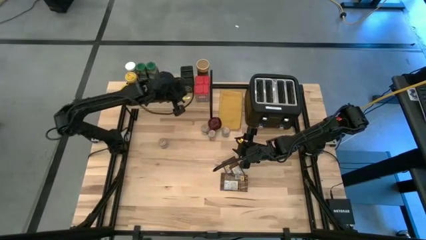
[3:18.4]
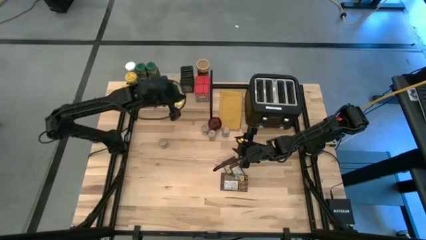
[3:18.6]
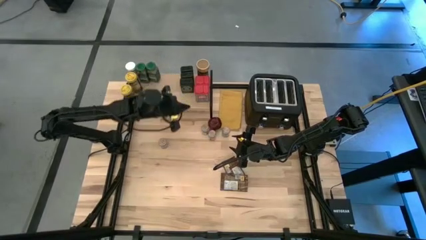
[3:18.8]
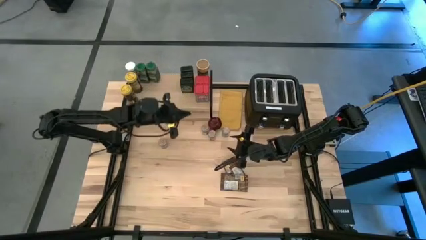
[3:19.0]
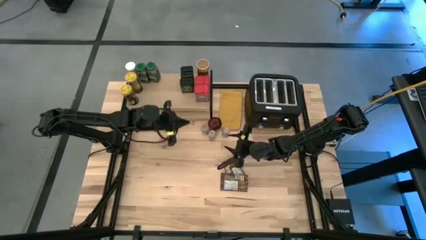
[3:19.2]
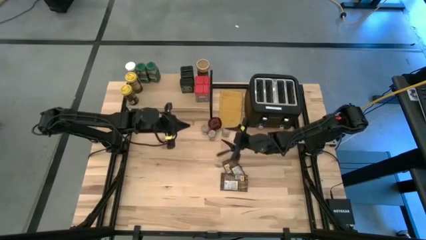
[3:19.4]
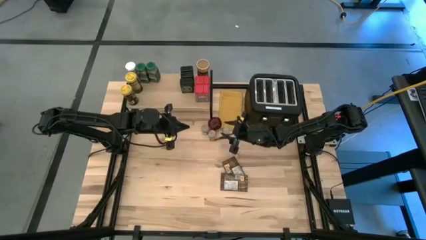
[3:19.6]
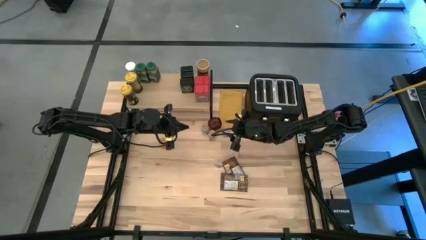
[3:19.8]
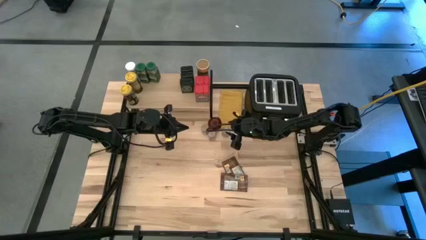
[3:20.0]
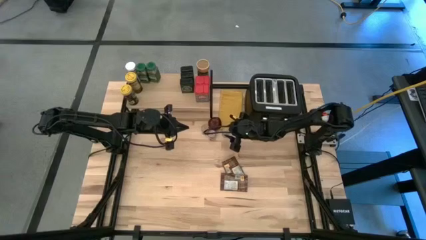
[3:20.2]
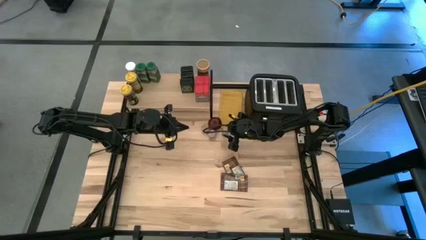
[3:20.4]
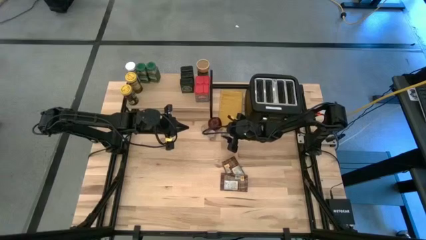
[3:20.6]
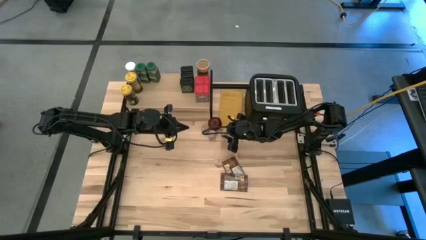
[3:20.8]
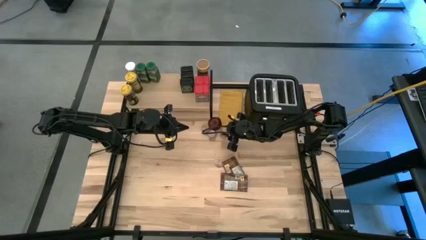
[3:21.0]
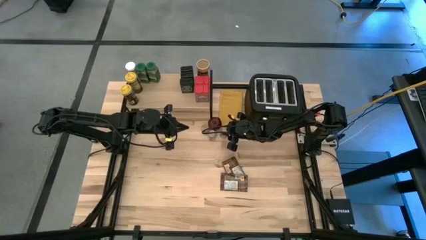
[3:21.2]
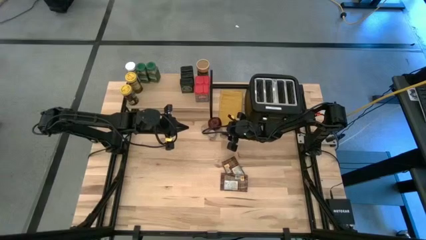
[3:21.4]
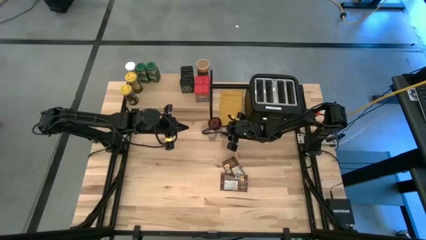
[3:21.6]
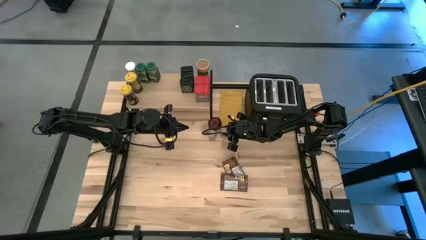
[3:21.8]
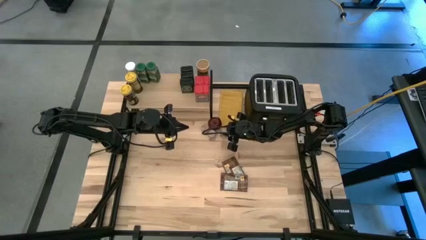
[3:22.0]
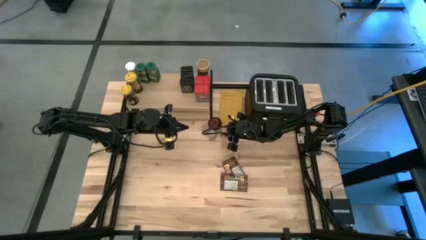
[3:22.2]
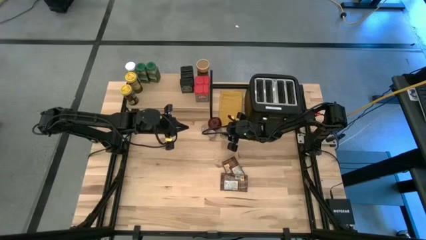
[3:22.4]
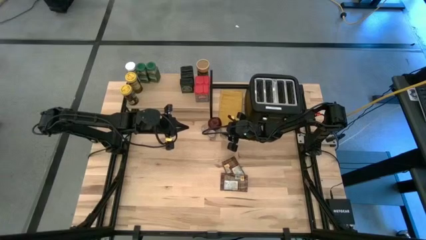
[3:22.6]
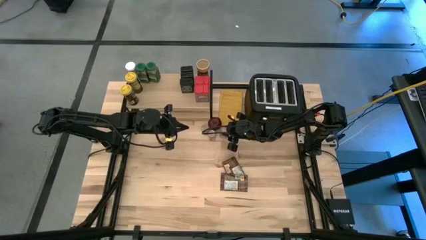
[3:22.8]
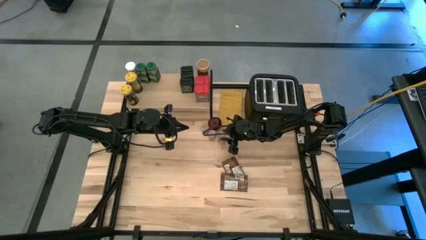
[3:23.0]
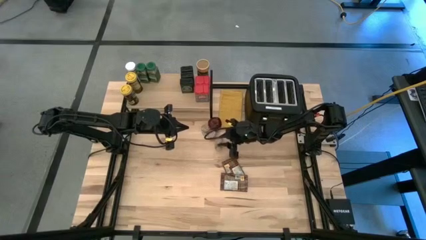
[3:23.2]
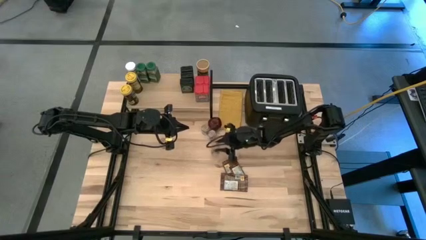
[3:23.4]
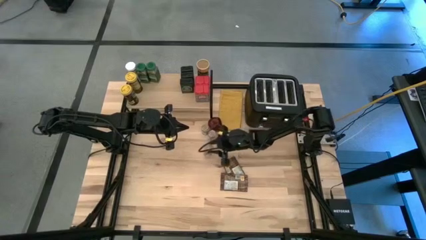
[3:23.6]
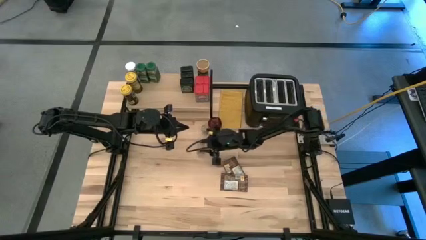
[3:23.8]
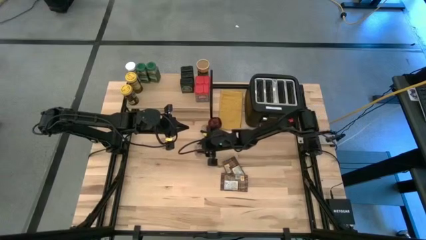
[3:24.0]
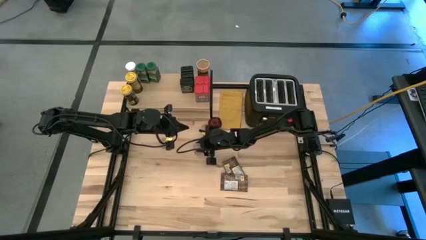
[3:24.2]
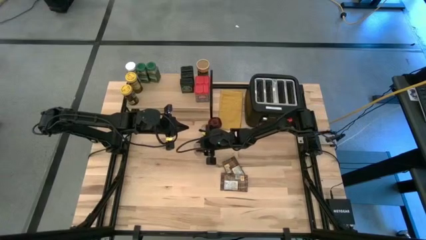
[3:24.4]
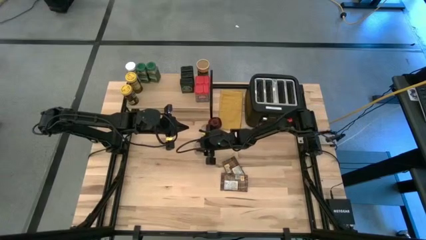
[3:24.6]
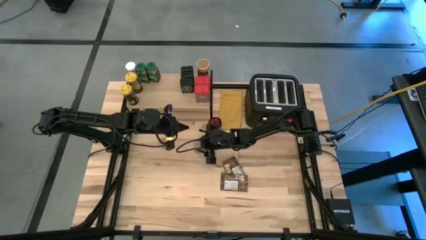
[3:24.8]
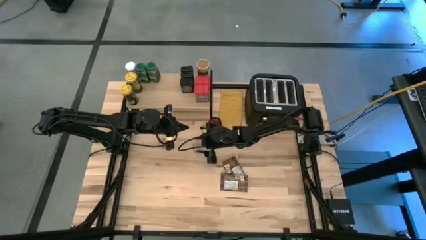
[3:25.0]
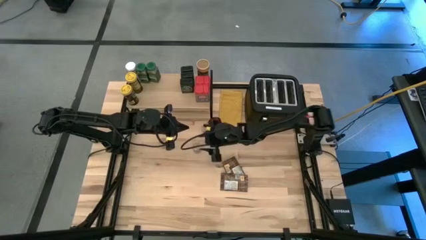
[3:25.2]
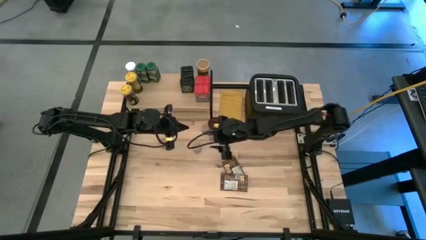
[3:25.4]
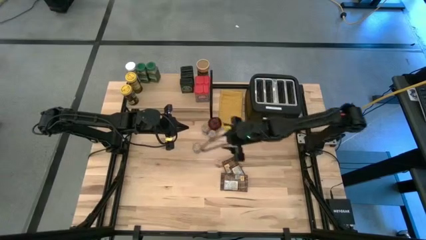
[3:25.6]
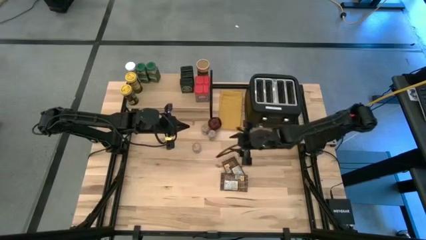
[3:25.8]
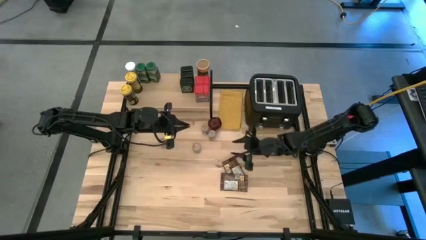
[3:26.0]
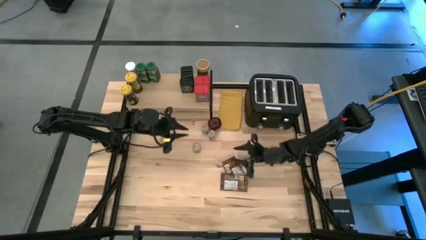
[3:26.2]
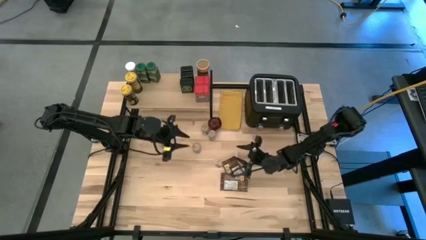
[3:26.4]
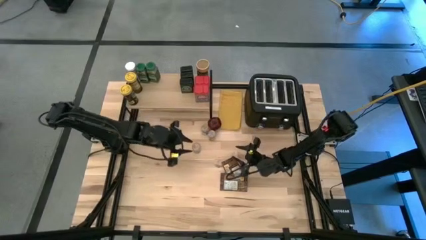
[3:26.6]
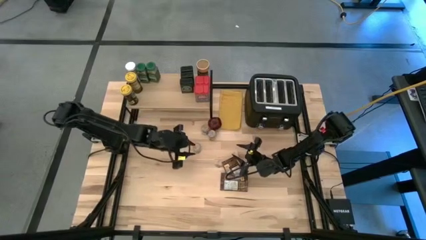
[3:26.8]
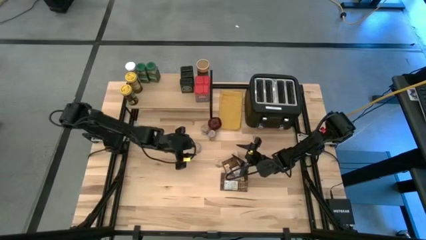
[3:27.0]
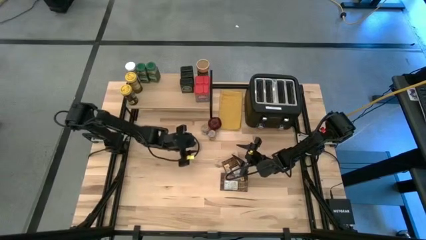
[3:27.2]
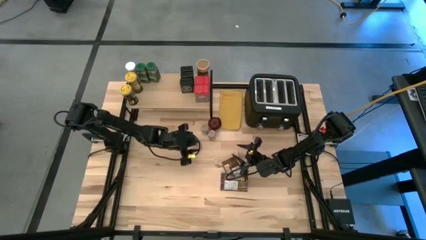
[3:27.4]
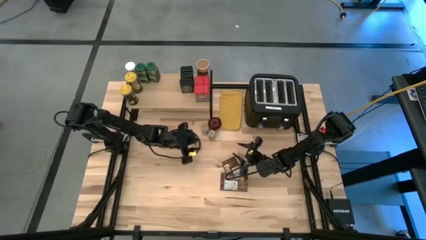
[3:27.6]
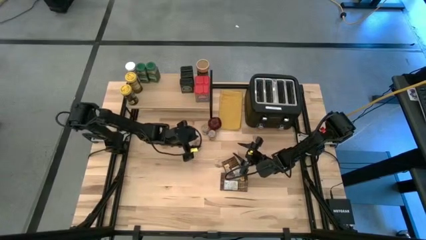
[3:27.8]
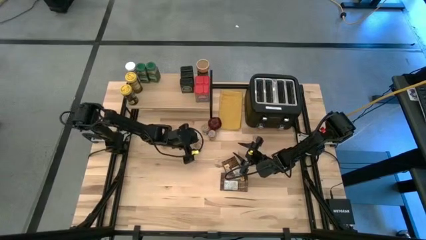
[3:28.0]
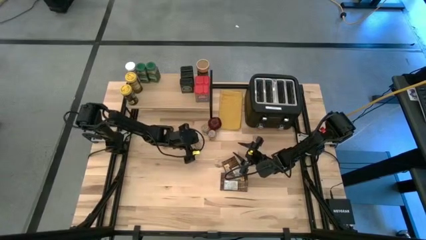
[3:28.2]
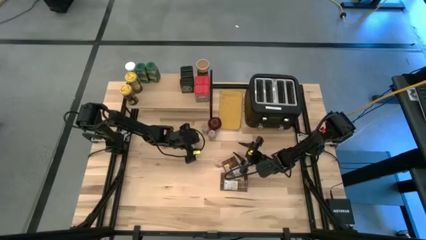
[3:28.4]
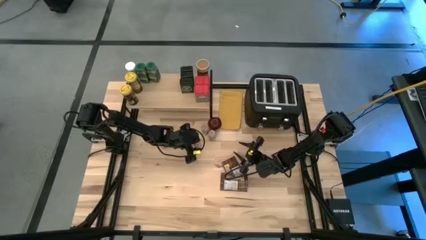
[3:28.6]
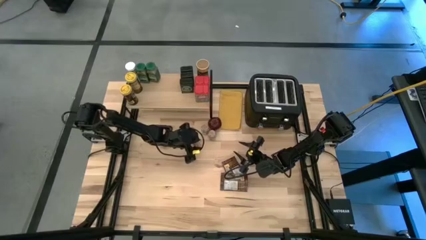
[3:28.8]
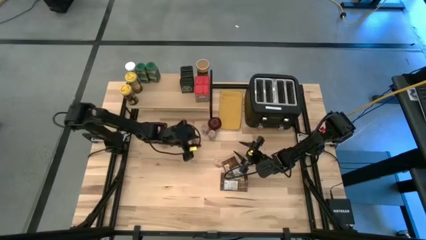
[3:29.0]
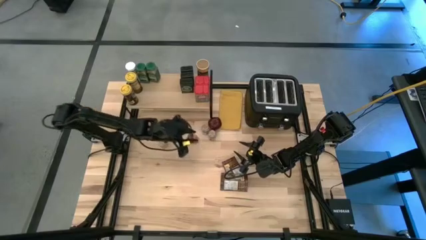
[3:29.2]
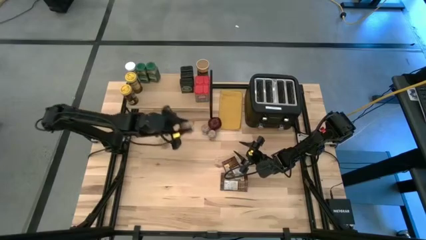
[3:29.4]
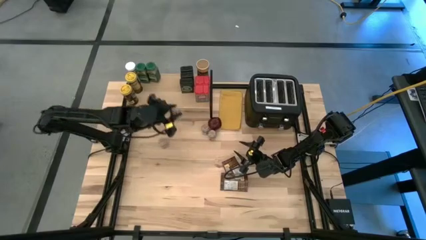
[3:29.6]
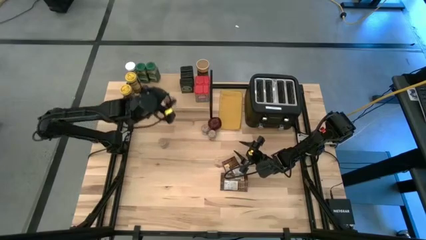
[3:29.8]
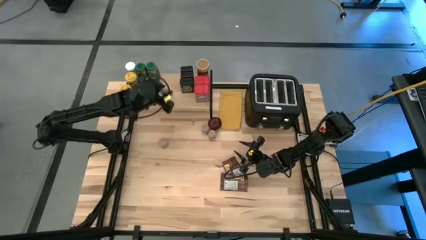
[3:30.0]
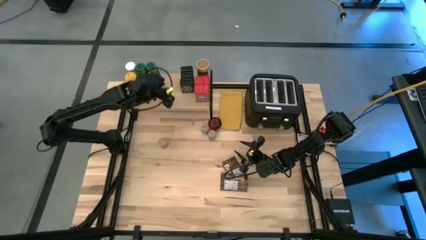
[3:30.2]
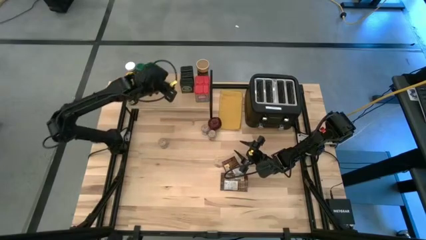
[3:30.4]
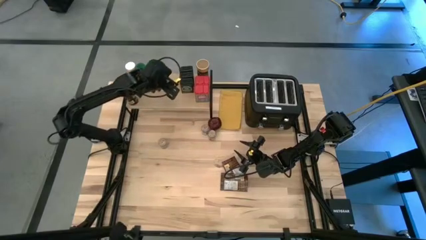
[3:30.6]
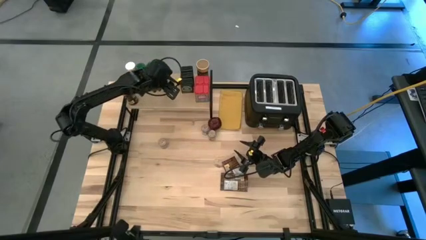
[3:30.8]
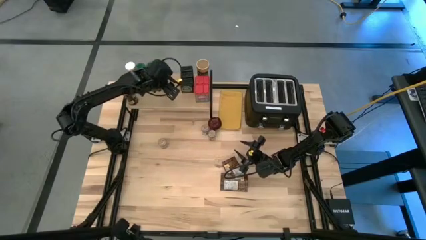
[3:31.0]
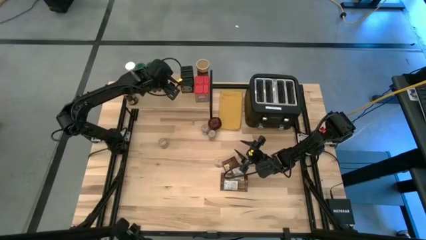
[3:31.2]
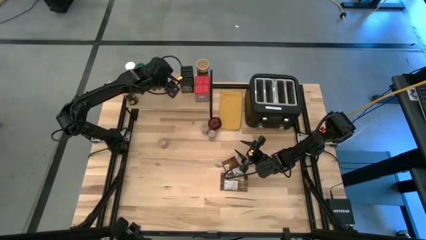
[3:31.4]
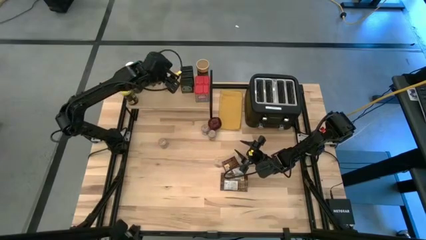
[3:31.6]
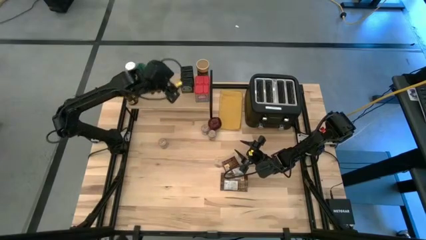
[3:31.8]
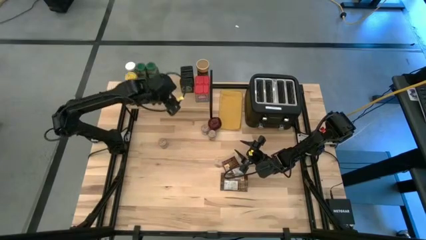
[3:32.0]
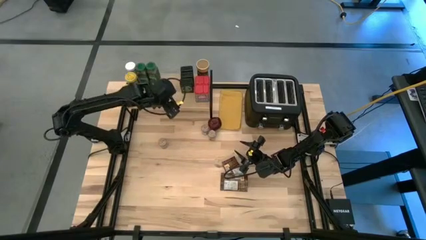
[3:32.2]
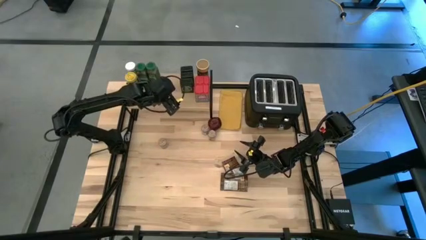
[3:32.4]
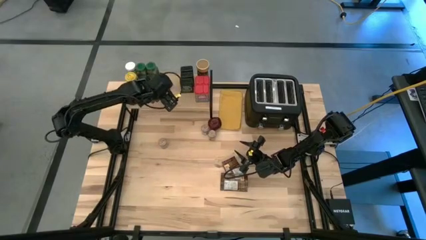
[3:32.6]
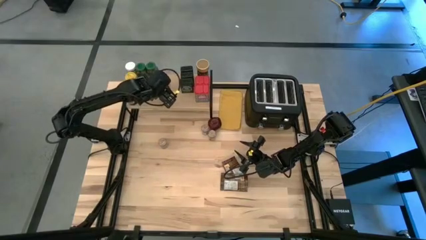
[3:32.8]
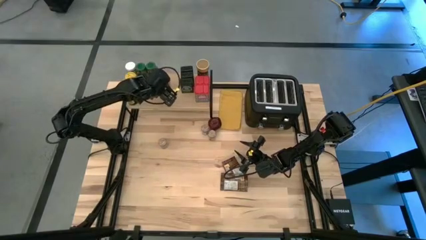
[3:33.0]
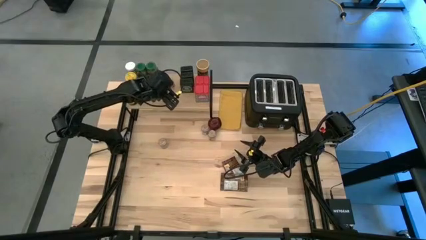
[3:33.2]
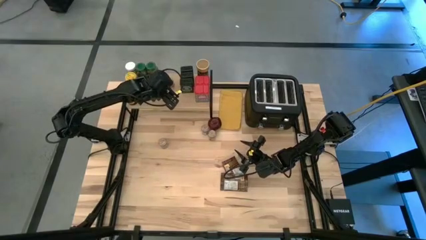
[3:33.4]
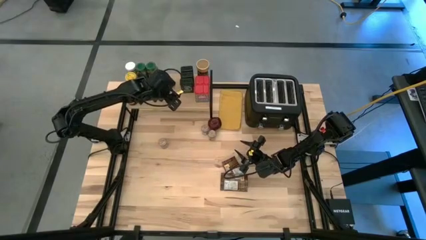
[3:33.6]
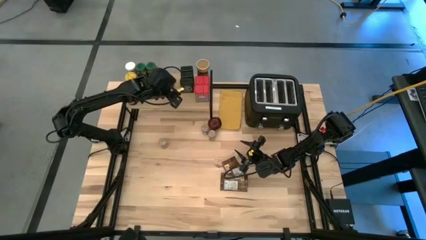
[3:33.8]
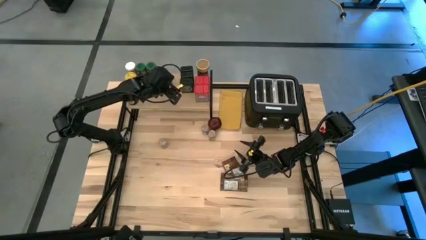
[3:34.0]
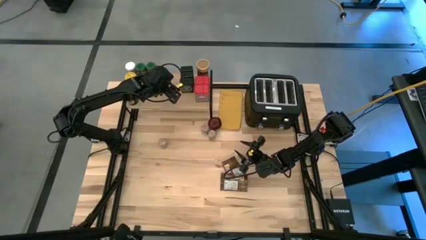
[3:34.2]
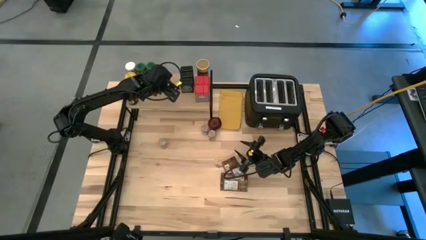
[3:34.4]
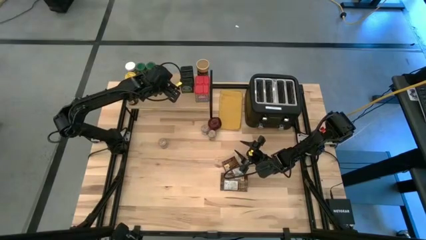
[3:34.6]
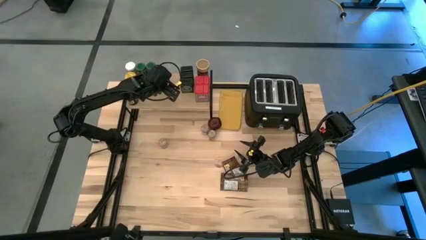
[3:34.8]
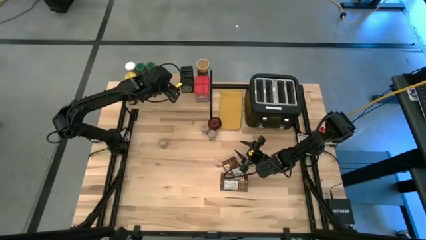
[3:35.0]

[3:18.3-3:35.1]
Task: Shelf spices
Put the right brown seasoning bottle on the shelf
